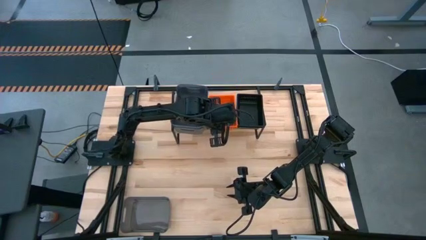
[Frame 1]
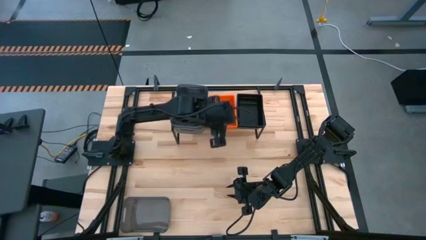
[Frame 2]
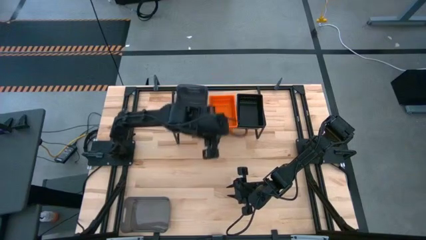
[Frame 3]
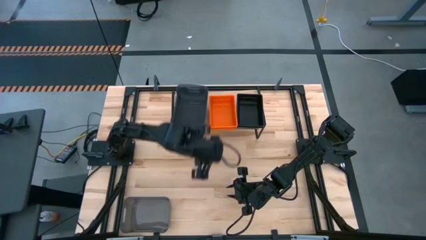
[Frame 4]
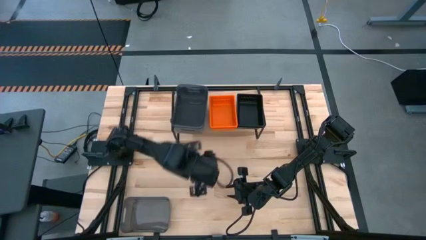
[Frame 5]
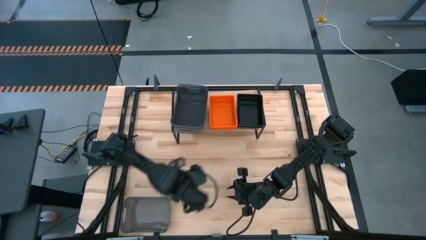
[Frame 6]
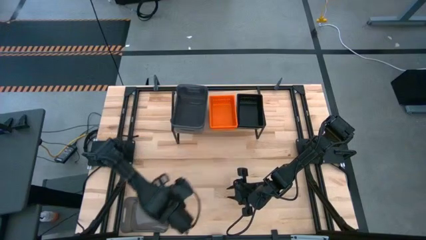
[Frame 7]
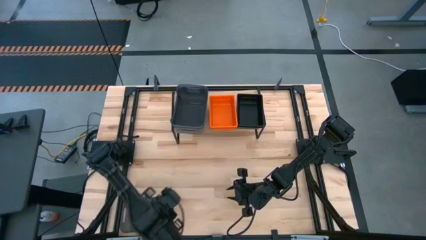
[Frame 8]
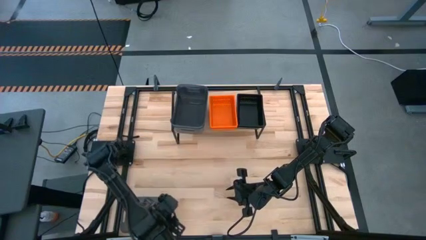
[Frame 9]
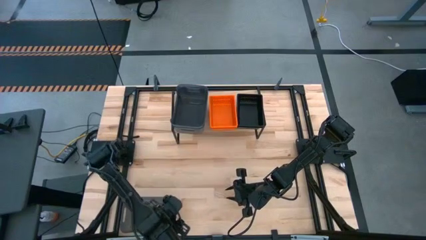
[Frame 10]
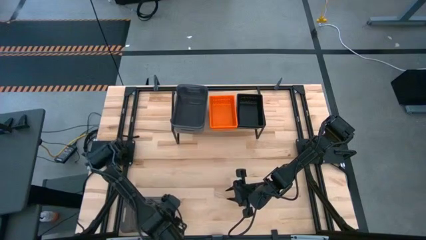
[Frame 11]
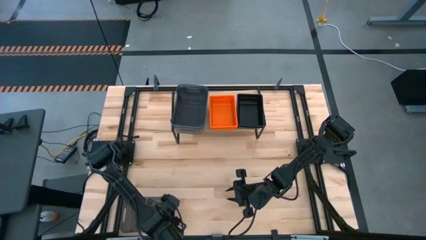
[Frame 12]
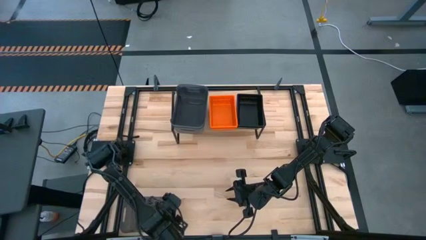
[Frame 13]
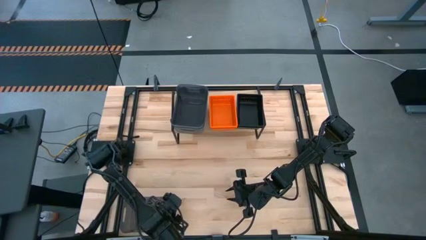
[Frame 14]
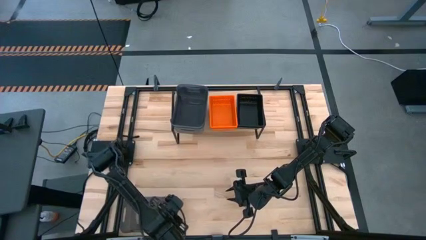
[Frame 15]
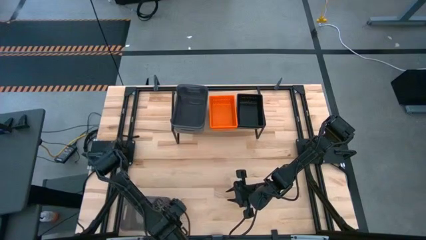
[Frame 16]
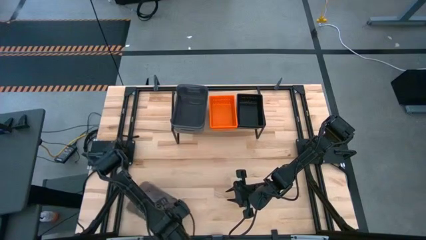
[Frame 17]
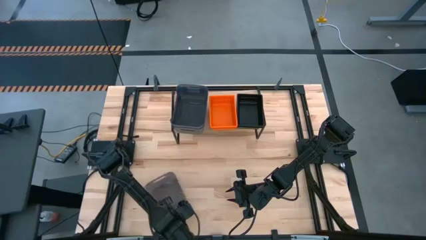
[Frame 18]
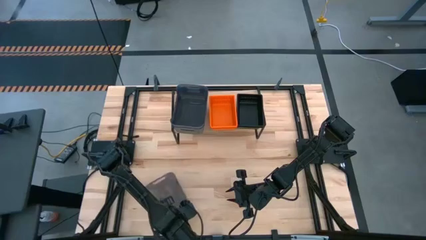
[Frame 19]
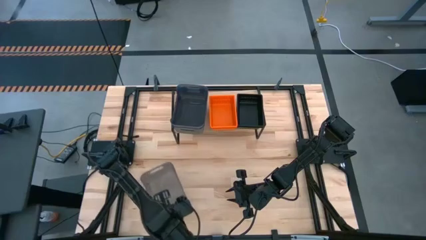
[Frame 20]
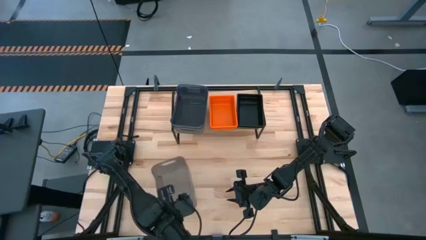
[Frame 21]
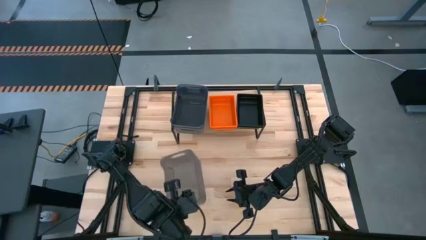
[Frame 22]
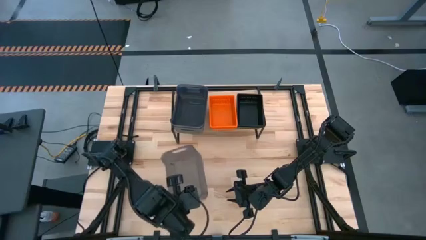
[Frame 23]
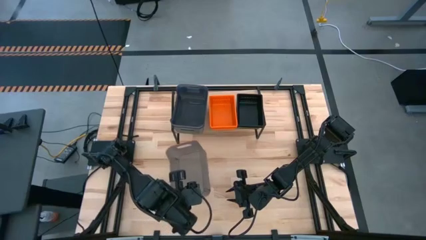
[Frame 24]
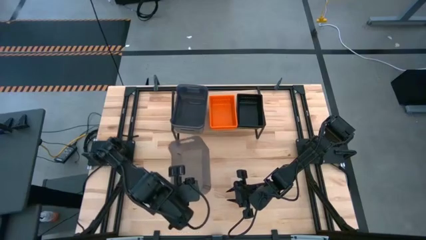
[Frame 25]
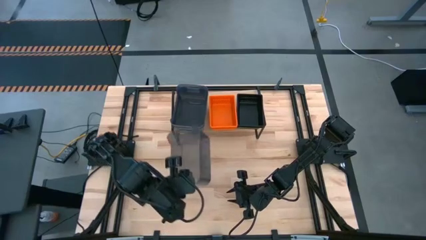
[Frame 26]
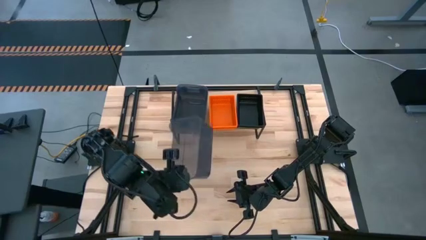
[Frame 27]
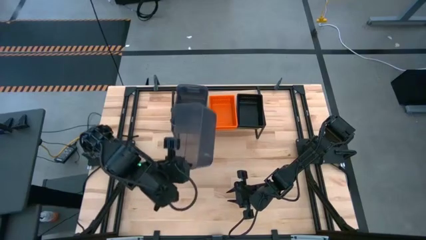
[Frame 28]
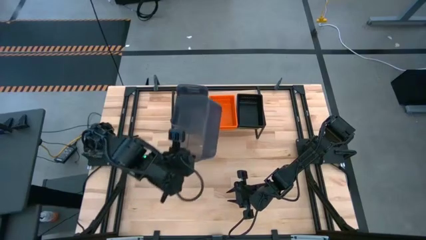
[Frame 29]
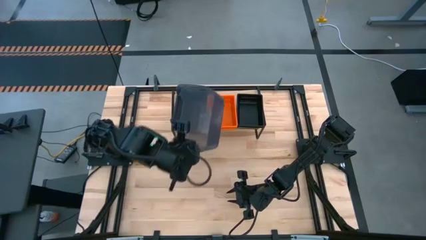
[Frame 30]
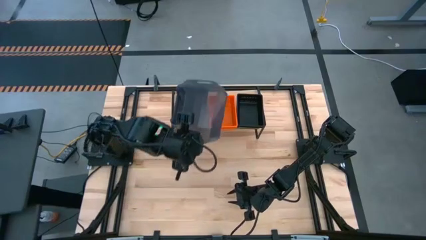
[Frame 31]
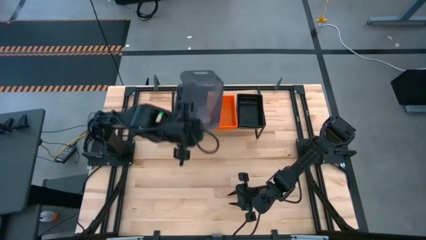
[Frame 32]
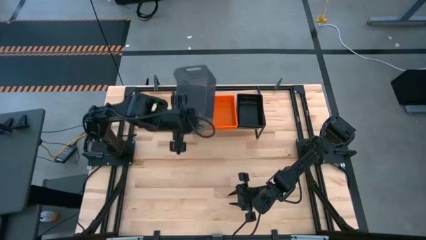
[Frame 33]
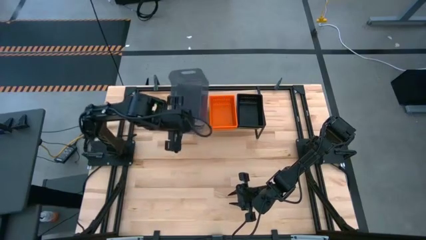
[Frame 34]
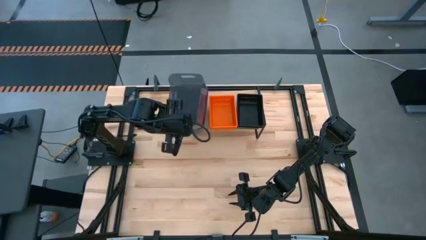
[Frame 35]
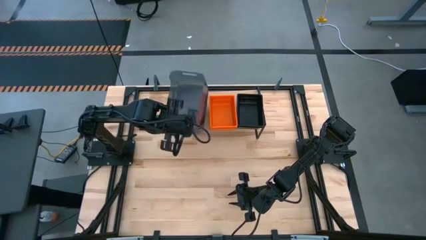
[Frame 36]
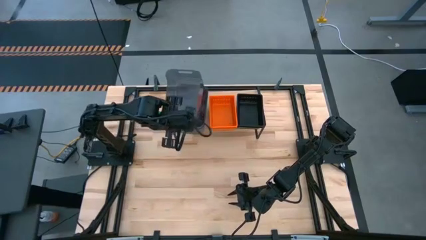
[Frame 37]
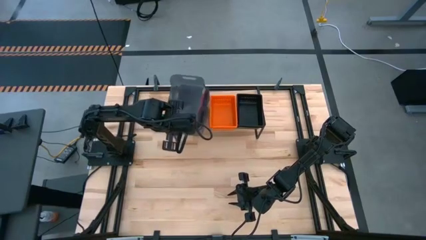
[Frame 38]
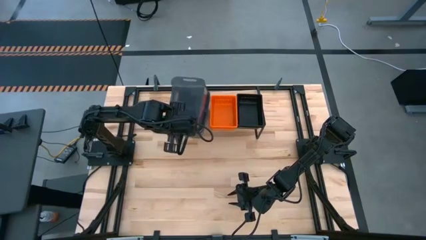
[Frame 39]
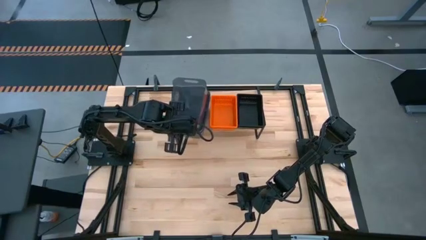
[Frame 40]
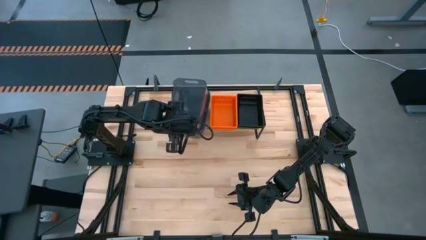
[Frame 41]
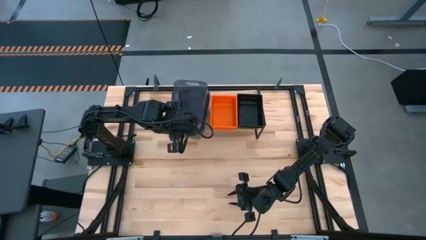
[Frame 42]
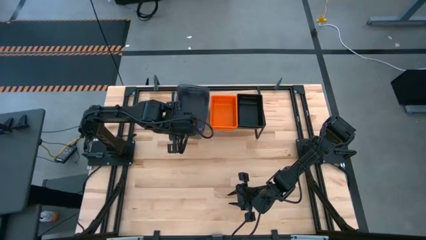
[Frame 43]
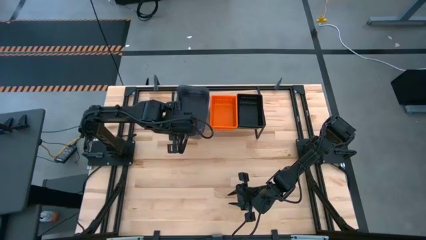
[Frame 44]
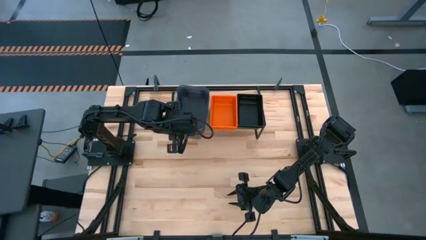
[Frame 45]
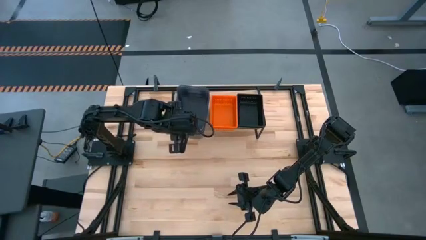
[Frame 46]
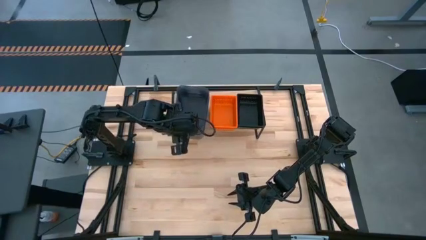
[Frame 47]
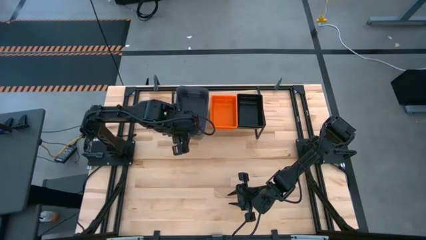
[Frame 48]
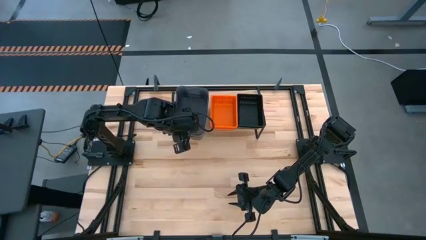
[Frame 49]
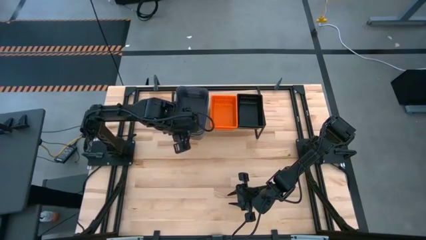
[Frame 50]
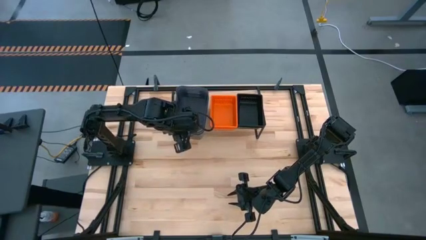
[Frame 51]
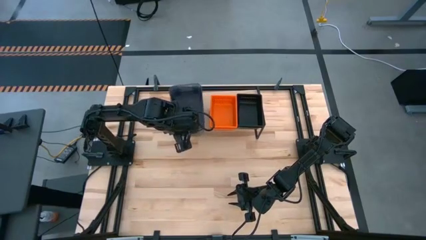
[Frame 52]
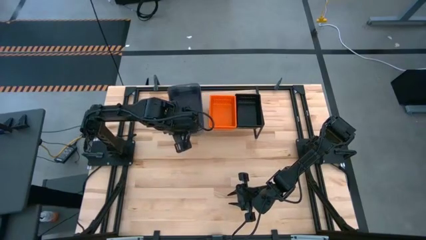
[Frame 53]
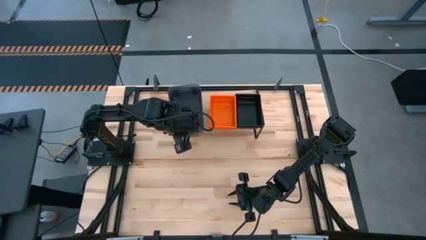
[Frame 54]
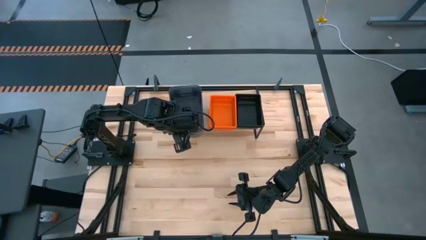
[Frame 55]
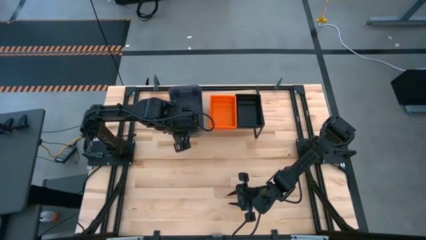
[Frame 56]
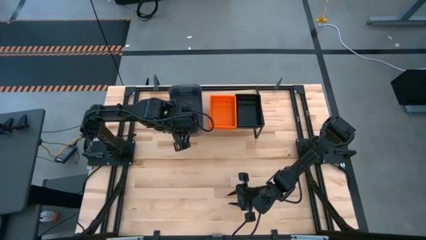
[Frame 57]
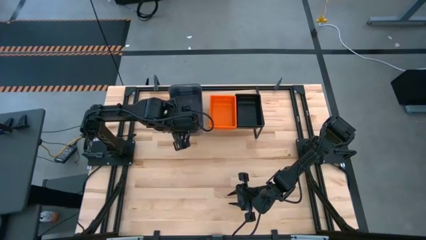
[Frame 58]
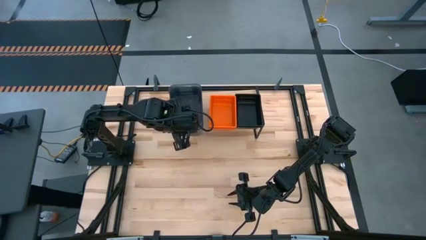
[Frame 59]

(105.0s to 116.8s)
Task: Stack baskets on shelf by color
Stack the black transparent bin on the stacked black transparent bins on the shelf

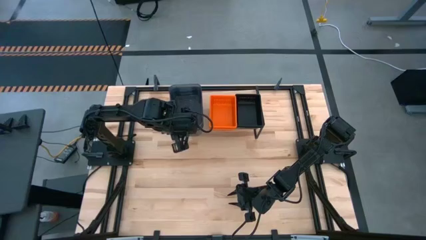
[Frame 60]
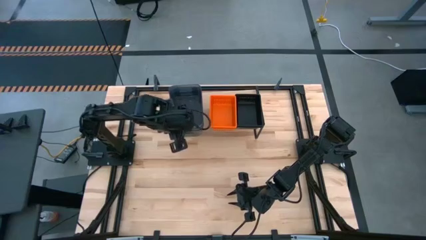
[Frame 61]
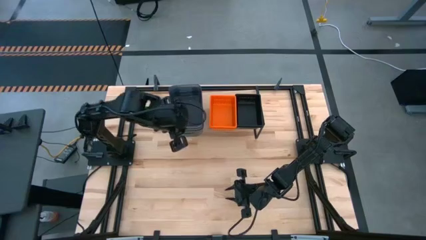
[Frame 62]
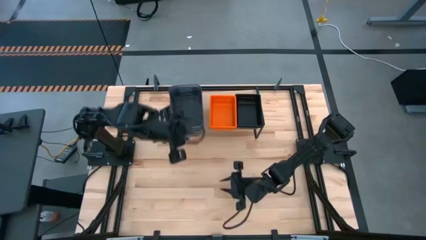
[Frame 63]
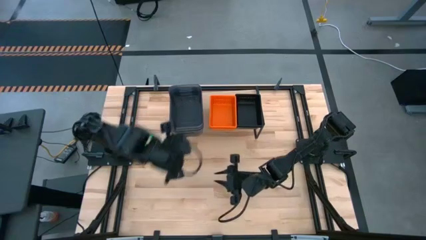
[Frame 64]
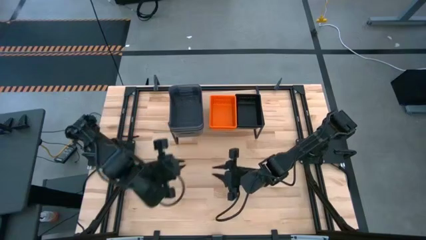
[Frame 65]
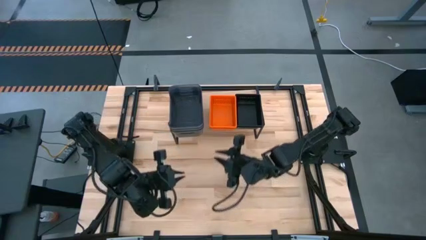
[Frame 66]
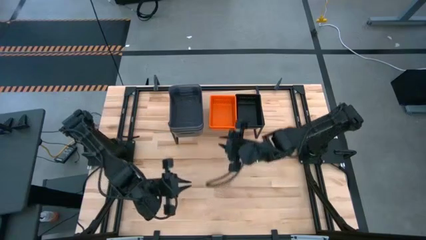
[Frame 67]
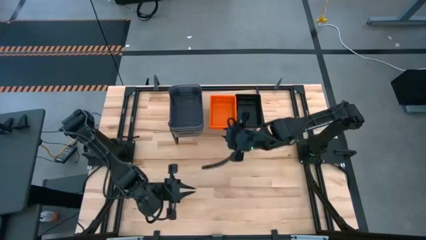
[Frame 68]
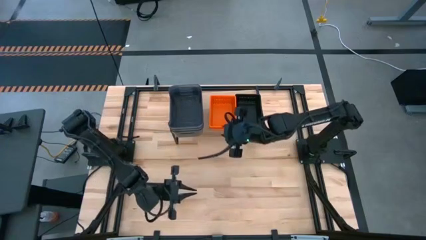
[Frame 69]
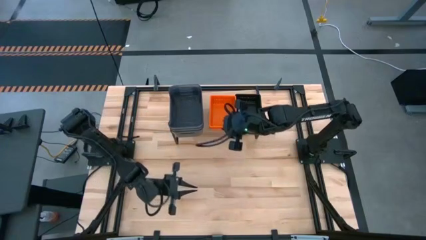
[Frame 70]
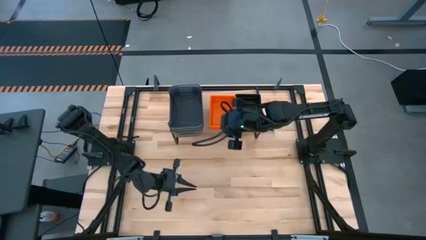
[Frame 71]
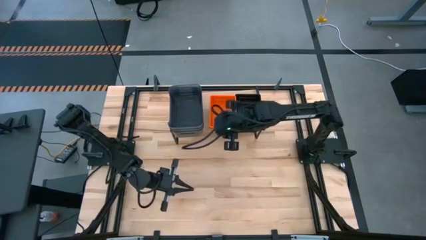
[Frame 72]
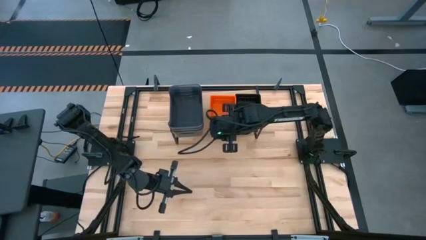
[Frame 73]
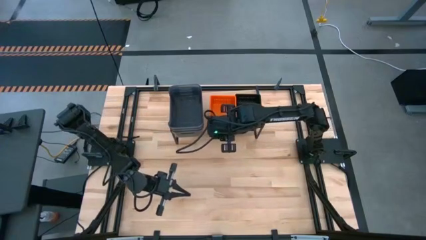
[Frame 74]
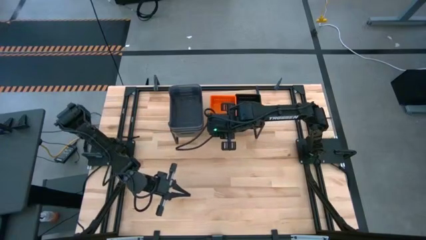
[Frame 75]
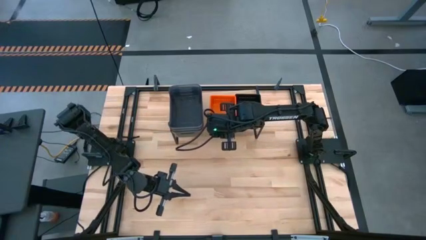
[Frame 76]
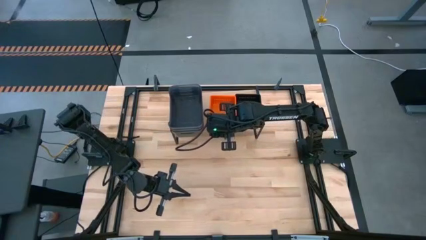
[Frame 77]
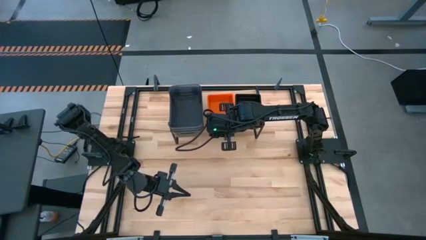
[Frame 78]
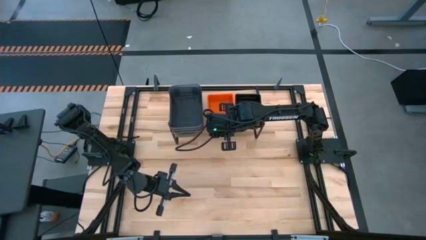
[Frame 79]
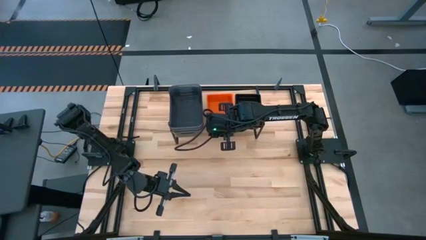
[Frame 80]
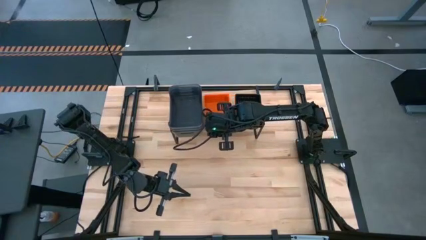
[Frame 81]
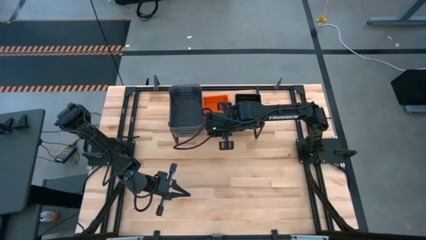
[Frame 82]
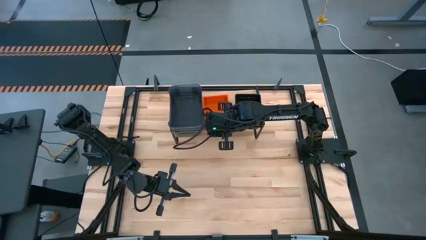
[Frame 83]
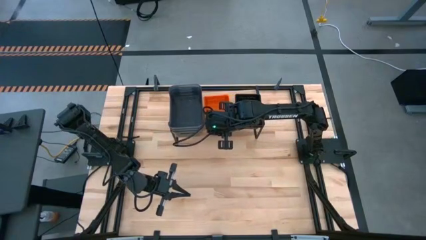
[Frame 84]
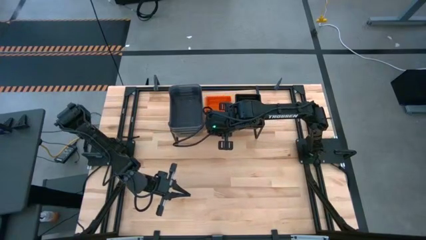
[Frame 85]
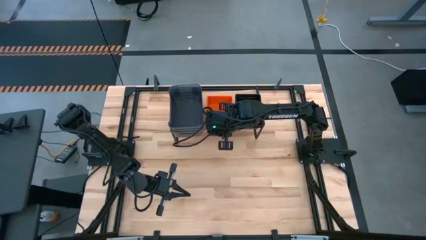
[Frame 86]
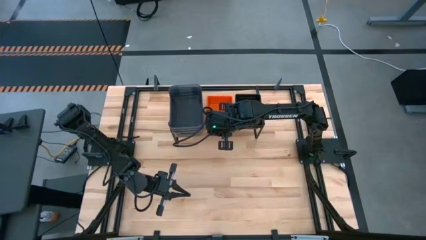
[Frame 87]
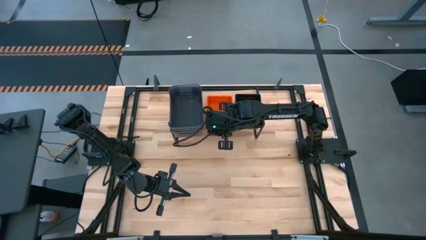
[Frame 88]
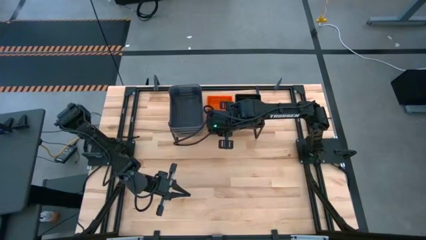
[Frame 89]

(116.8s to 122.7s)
Adjust the stacked orange bins
